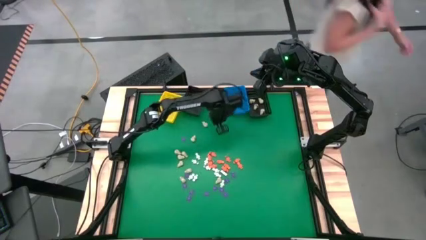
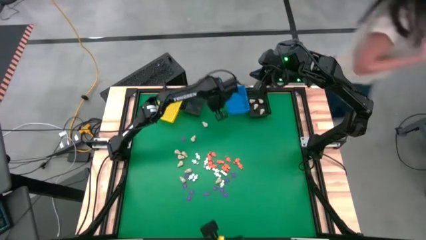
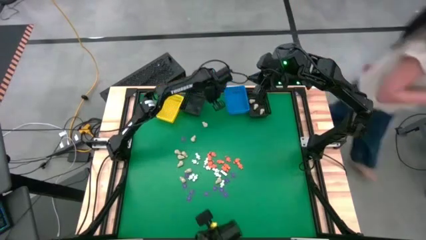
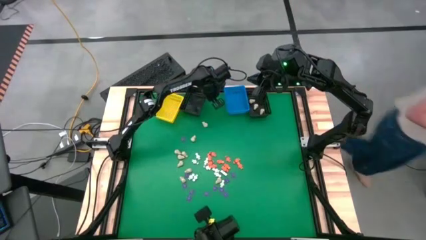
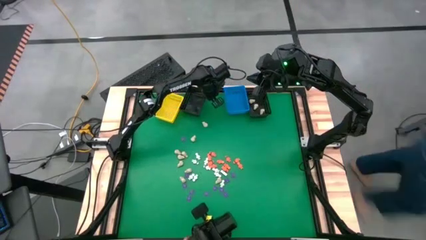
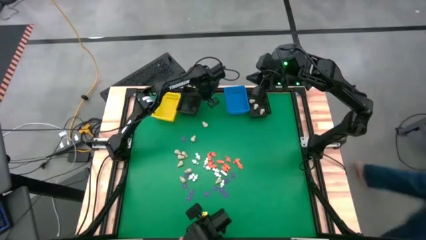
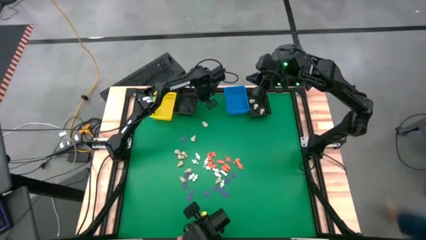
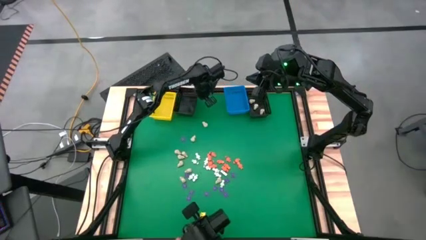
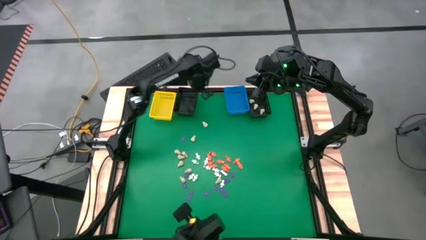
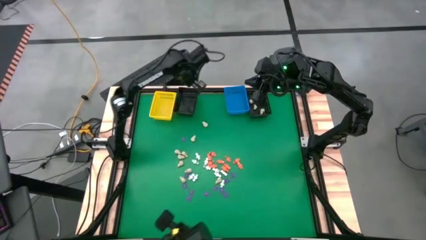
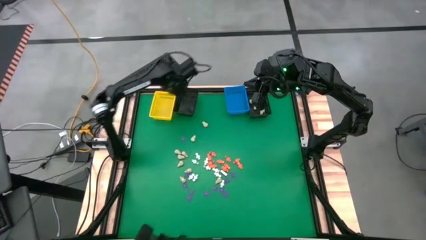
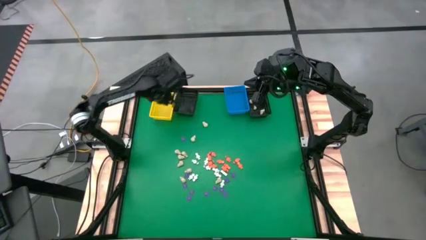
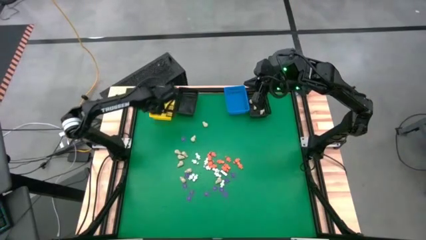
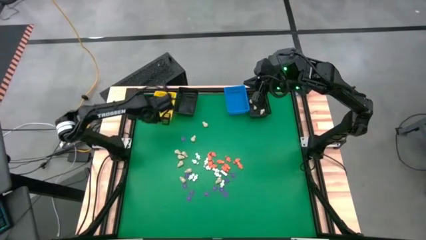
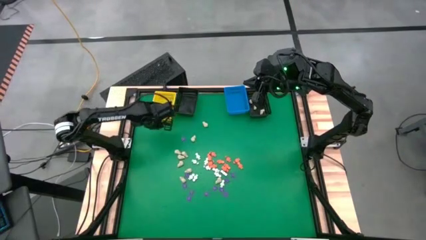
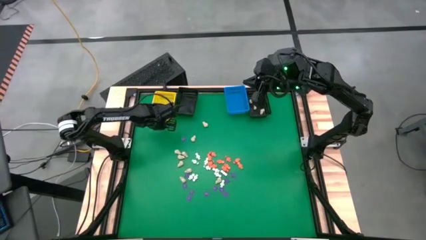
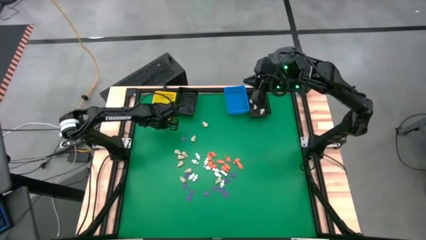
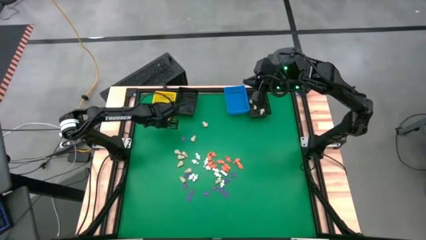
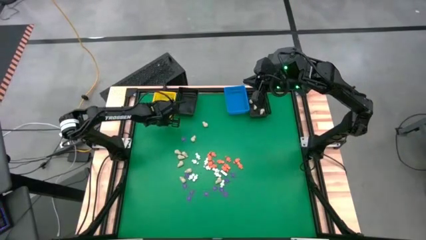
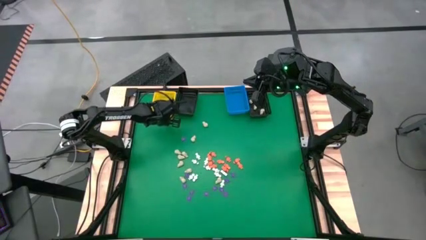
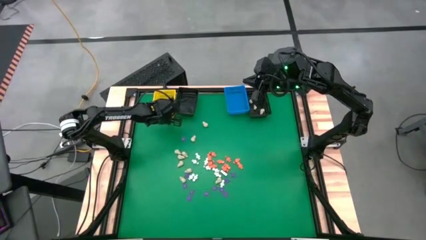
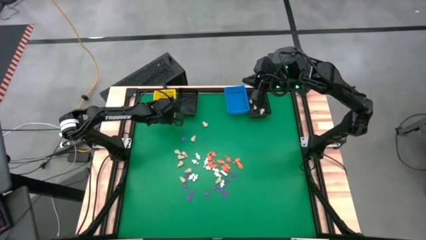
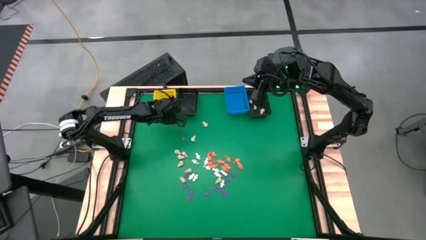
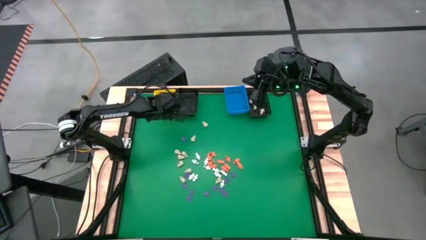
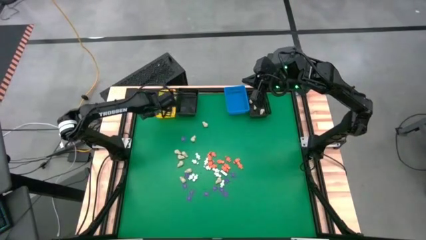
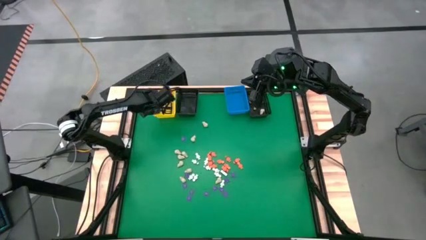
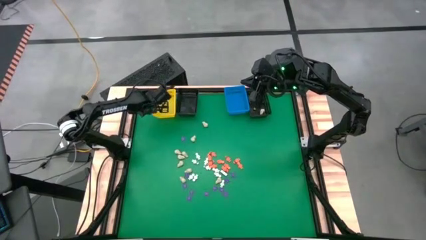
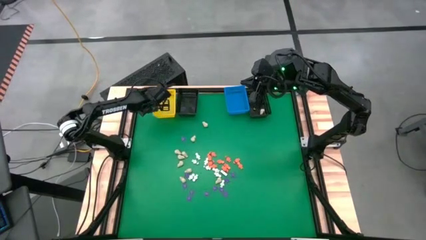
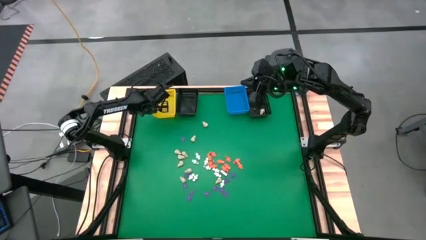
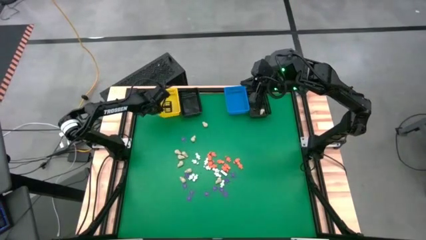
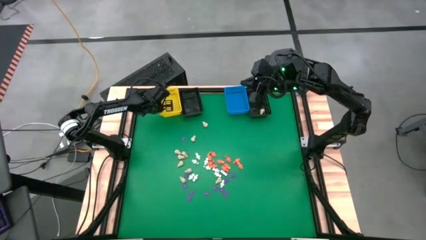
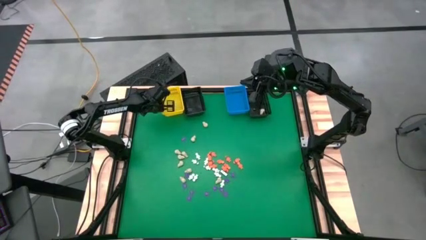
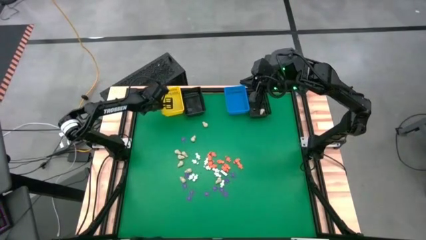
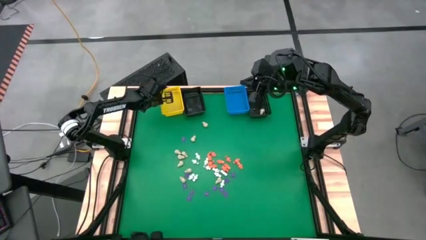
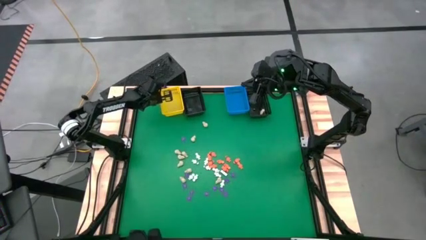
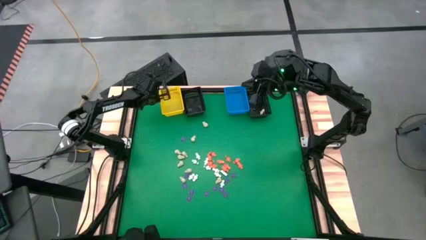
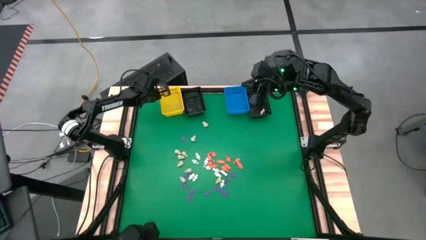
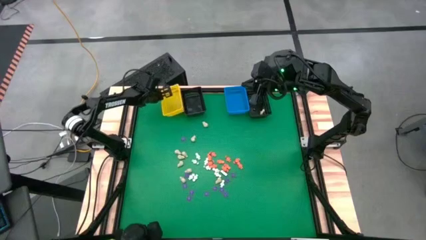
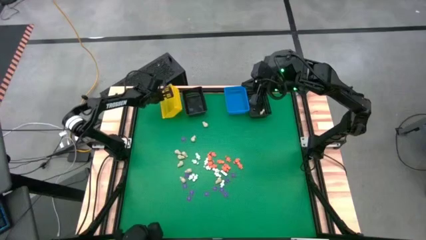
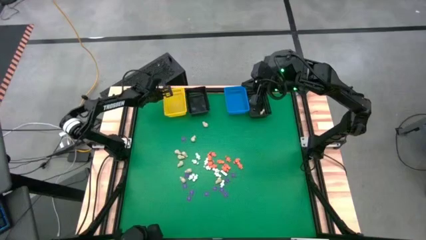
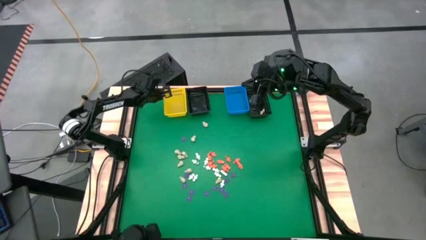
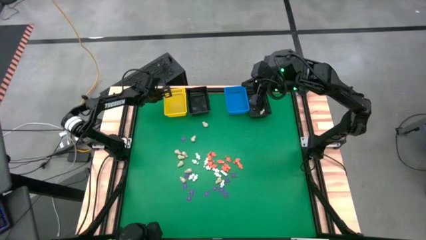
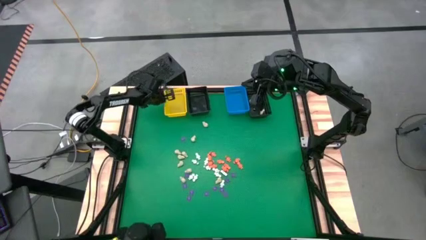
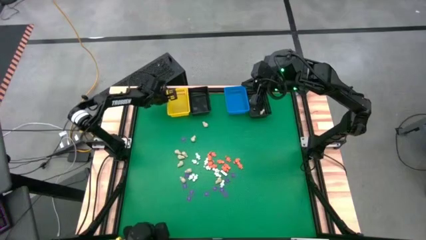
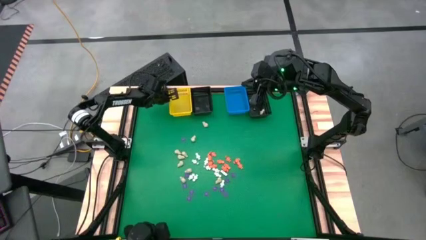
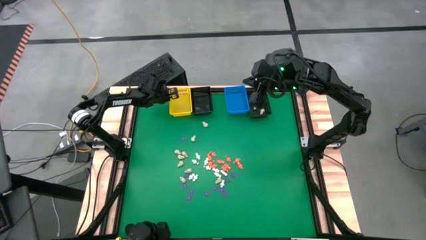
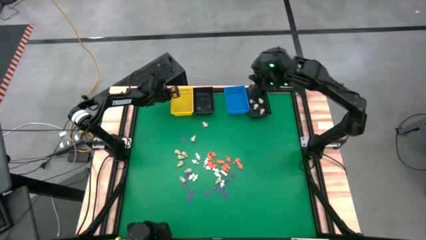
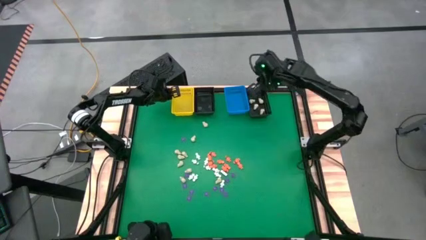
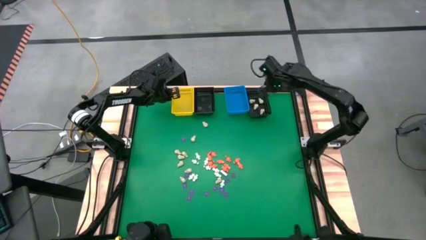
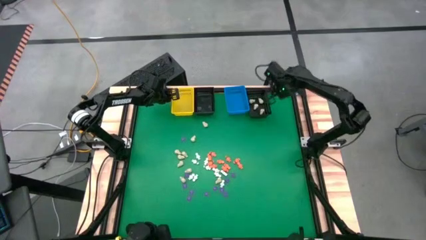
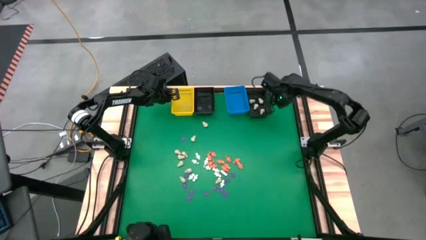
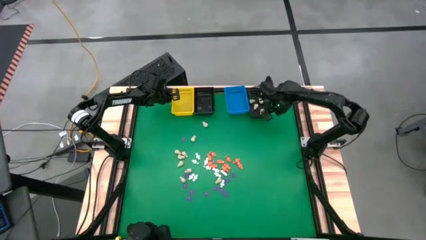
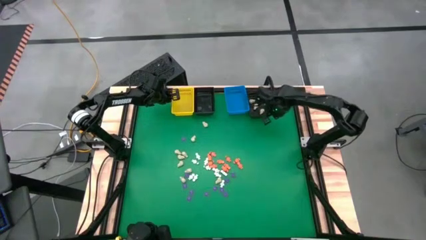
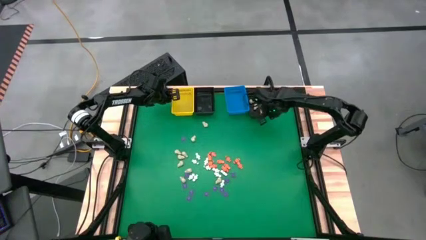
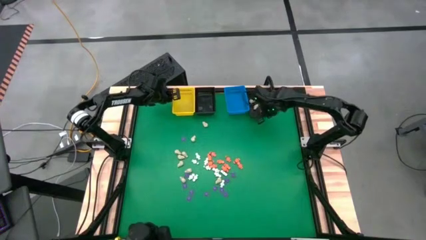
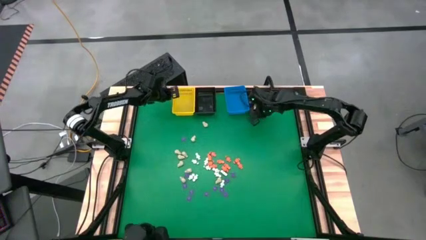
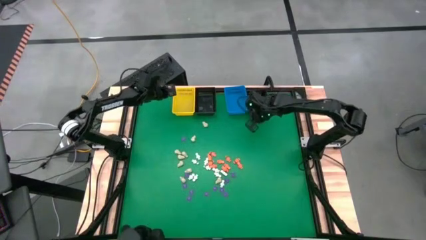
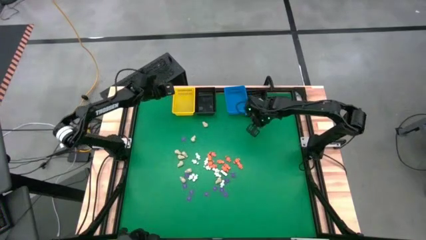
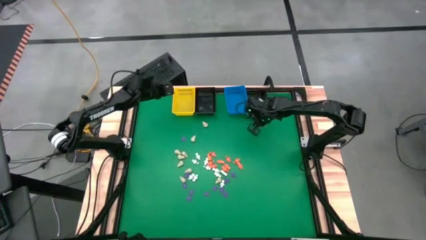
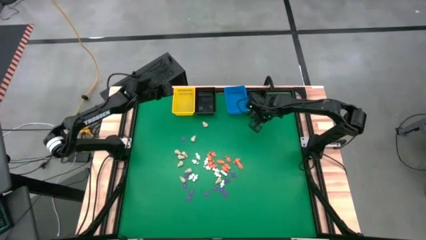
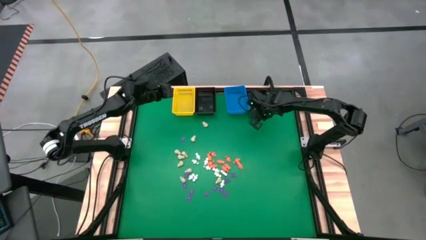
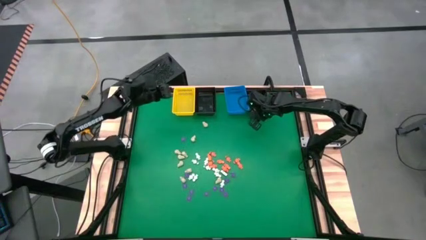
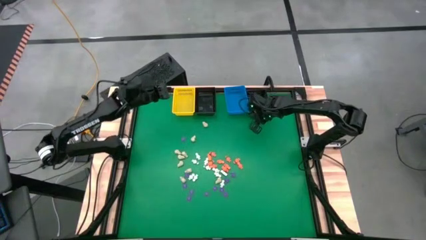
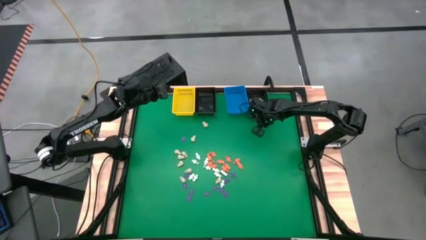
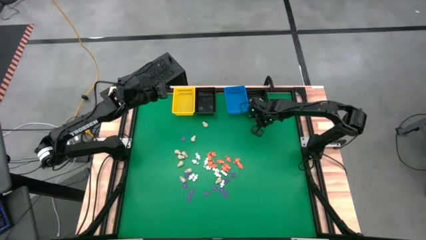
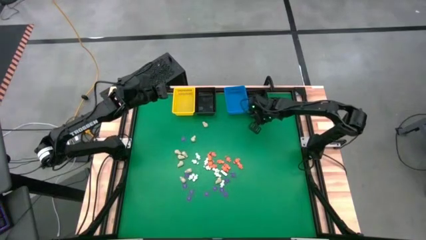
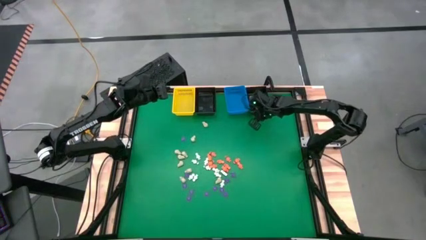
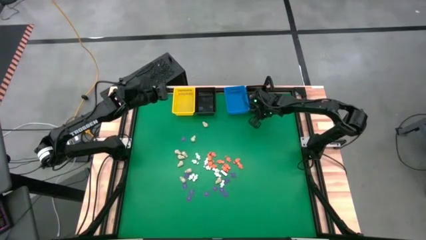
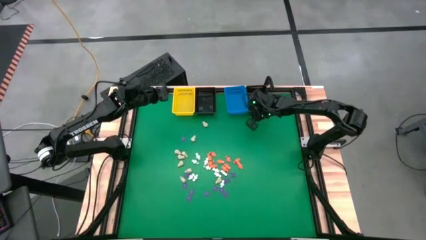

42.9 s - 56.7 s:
Task: Sort Halloween decoration
Adjust the colored baskets

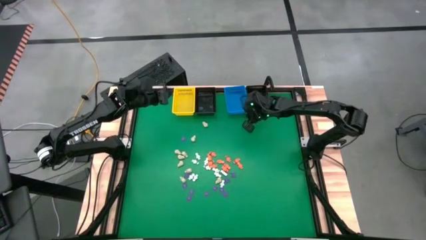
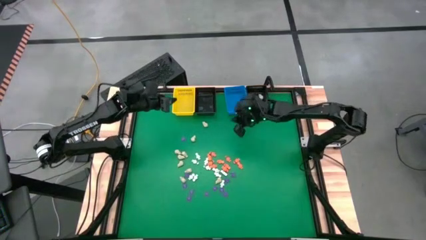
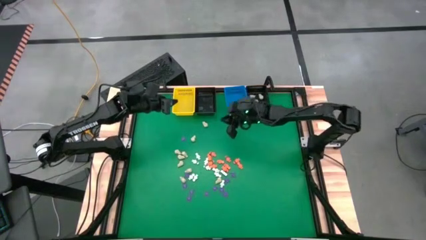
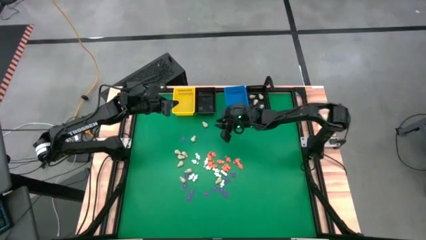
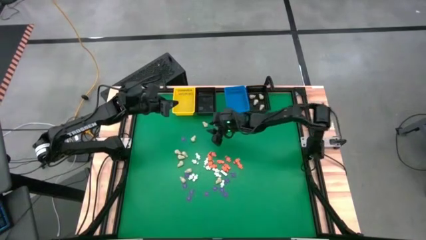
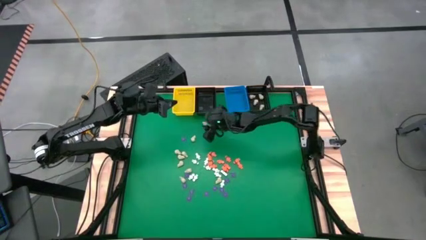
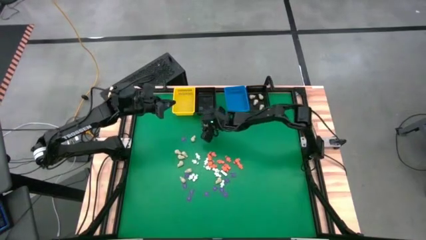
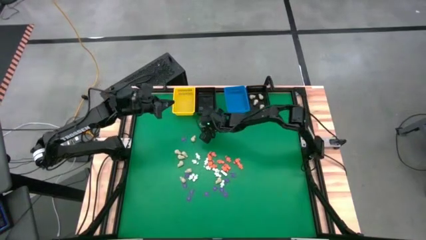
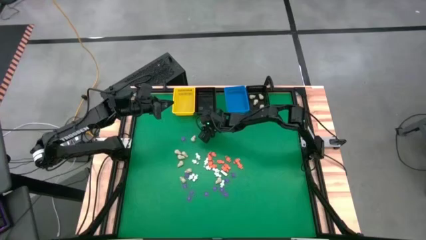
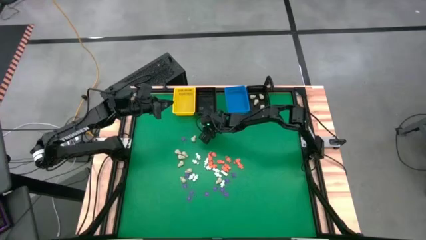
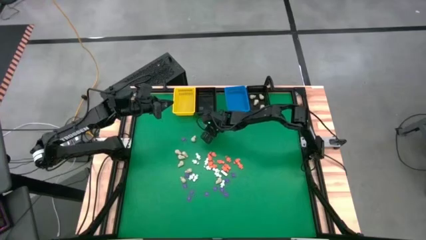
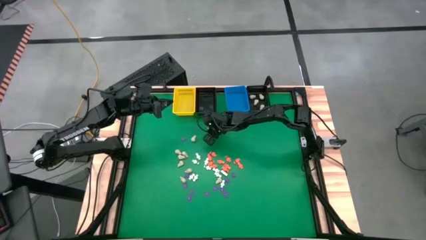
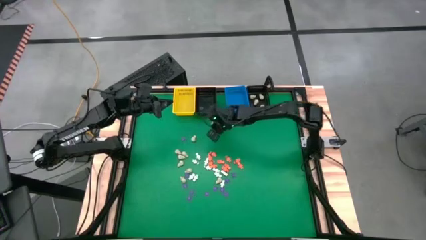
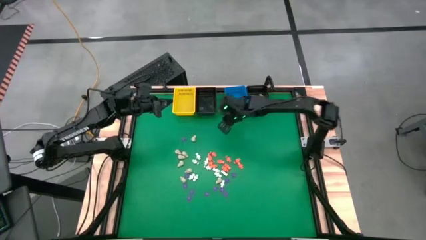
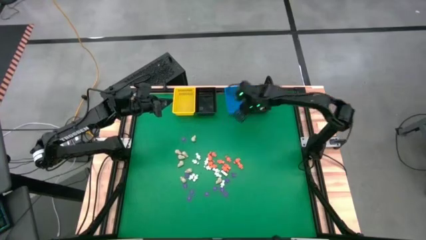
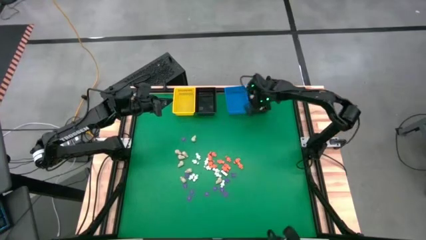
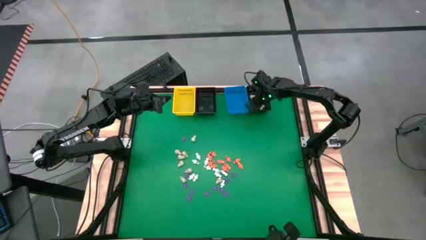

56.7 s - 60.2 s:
Put the white skull toy into the right black basket
